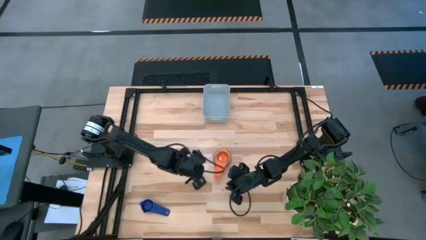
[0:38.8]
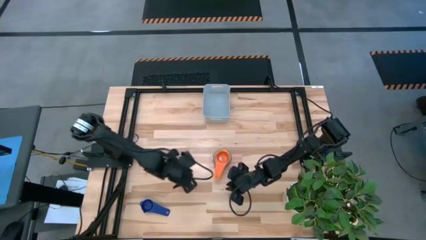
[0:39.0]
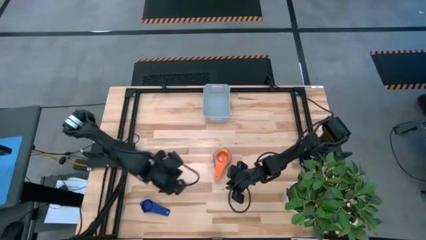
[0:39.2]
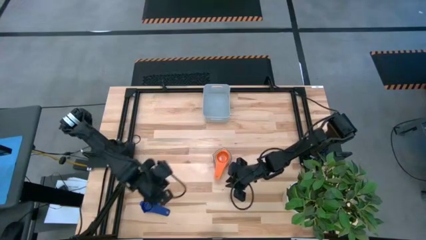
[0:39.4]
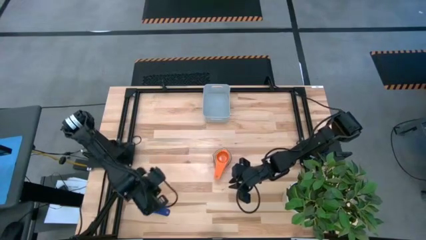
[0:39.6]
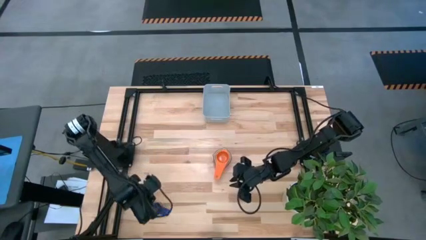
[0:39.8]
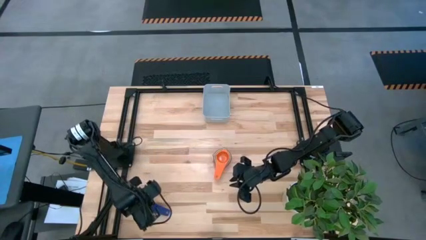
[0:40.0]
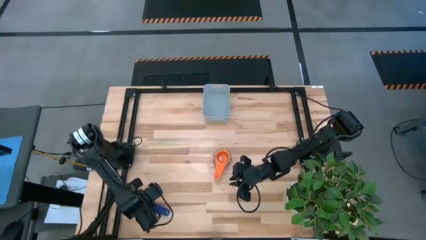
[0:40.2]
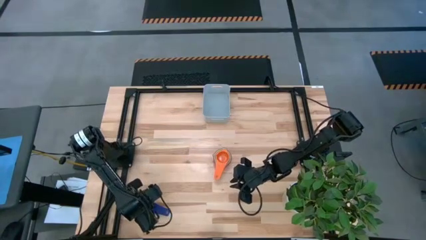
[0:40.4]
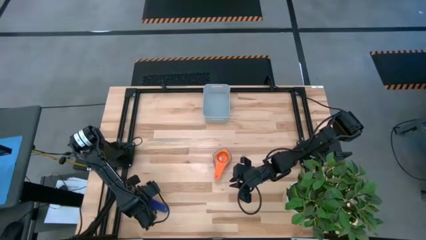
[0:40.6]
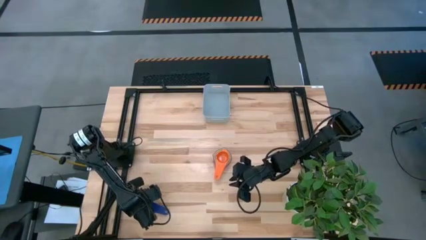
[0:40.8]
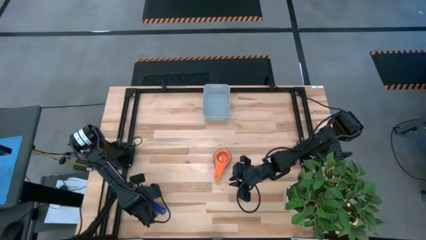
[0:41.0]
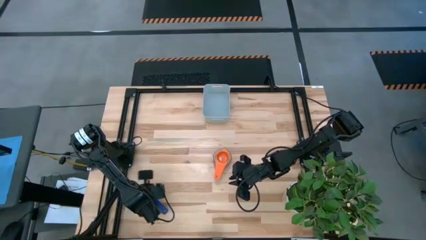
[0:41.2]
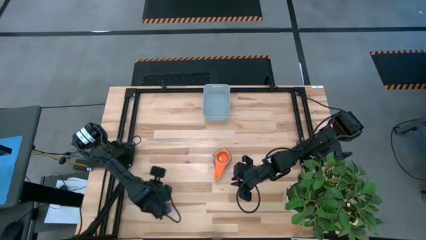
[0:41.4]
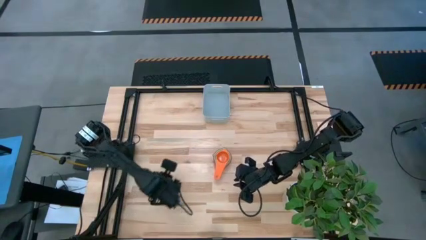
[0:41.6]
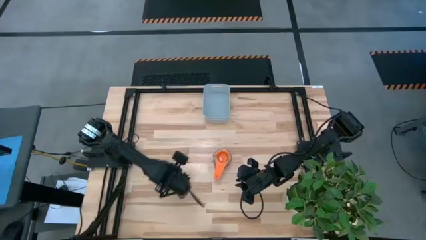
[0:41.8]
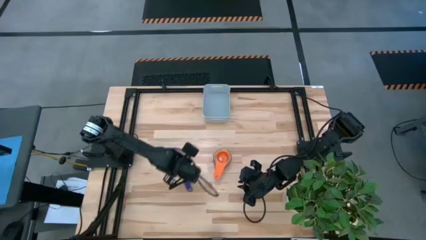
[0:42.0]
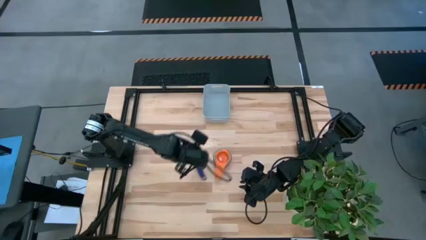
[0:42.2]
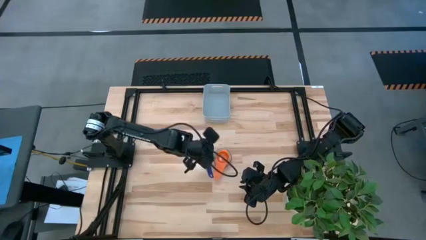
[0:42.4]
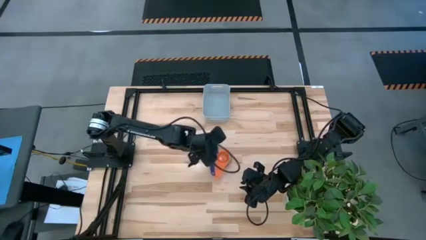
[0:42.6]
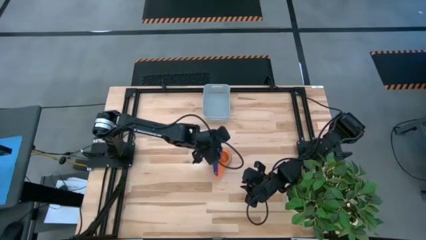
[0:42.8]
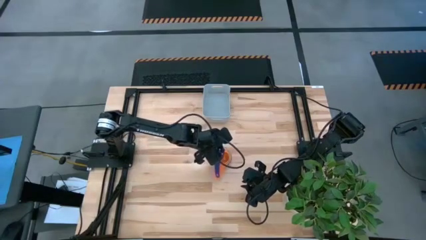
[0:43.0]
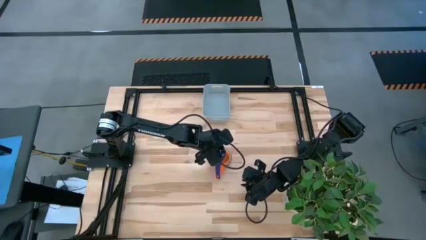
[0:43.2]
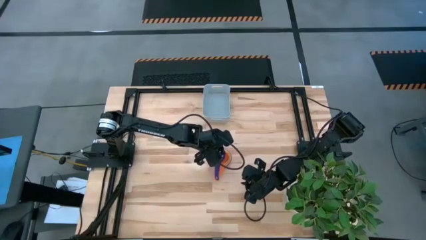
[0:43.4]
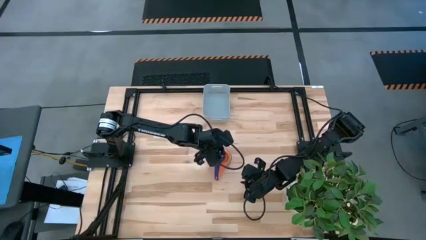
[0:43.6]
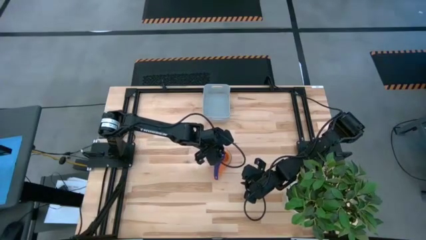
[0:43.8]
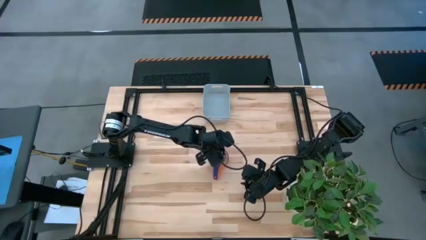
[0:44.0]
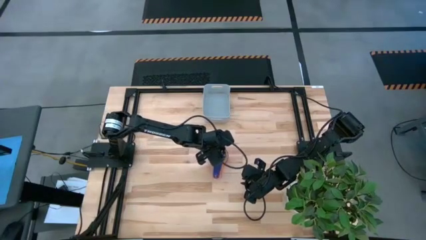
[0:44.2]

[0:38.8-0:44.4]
Task: Nest measuring cups in basket
Stack the violet measuring cup on top of the orange measuring cup

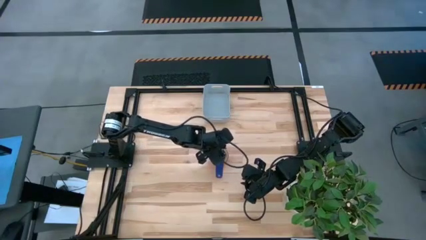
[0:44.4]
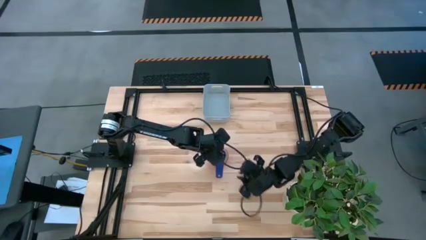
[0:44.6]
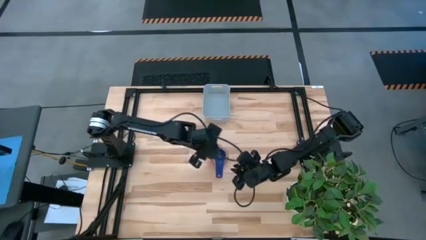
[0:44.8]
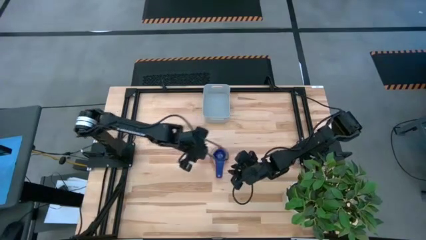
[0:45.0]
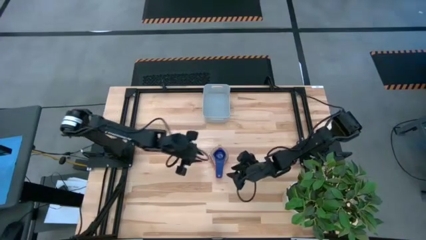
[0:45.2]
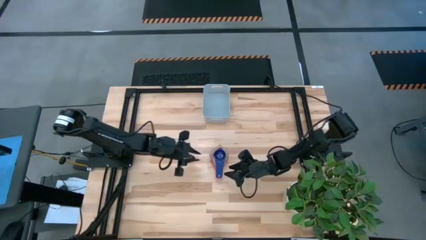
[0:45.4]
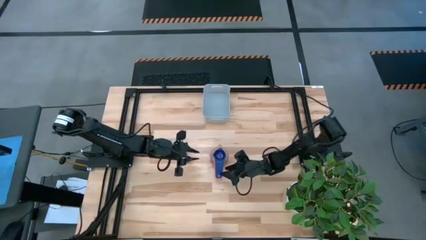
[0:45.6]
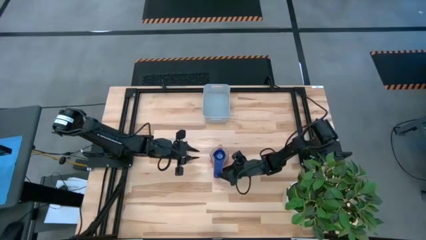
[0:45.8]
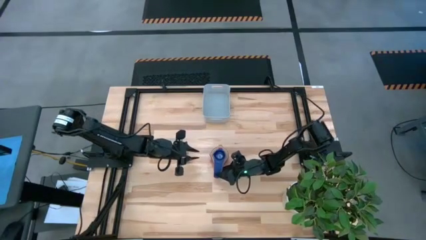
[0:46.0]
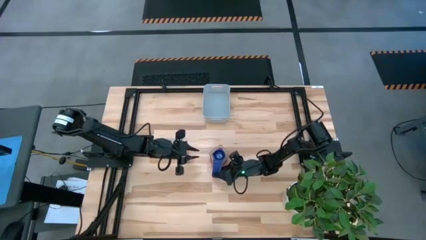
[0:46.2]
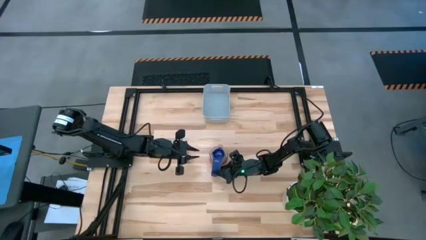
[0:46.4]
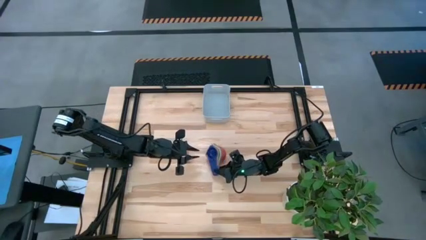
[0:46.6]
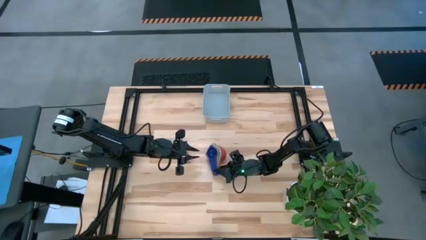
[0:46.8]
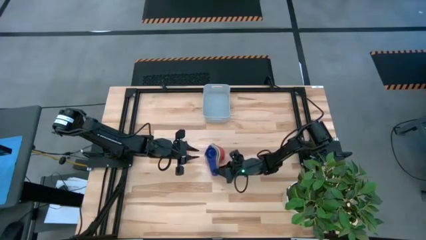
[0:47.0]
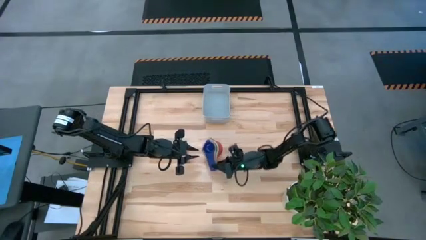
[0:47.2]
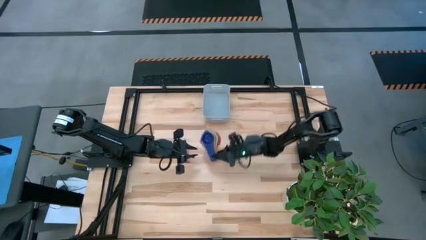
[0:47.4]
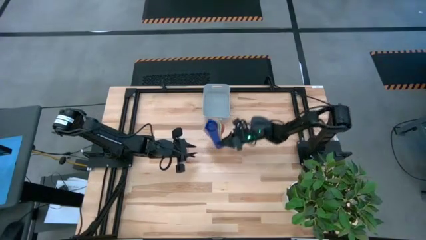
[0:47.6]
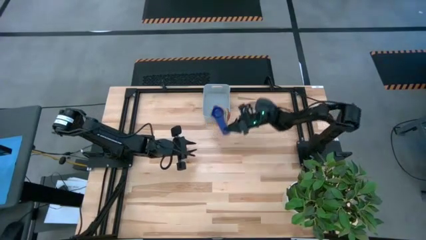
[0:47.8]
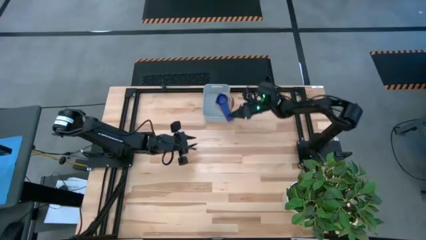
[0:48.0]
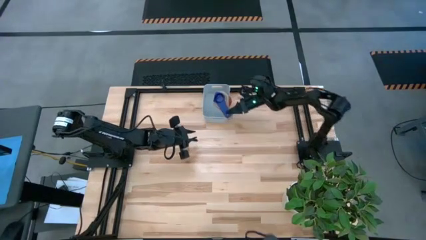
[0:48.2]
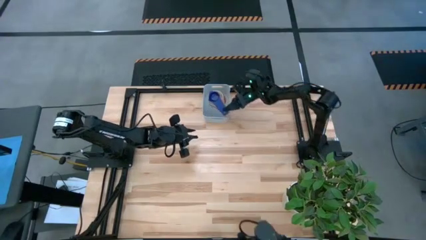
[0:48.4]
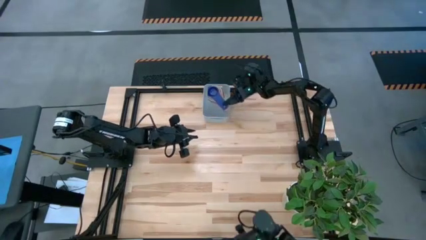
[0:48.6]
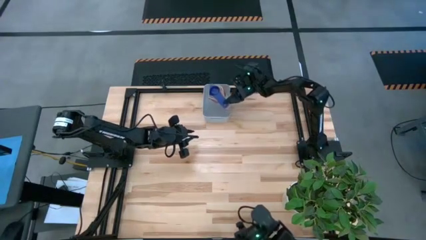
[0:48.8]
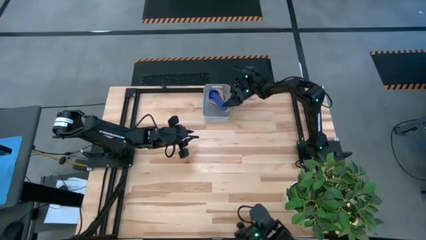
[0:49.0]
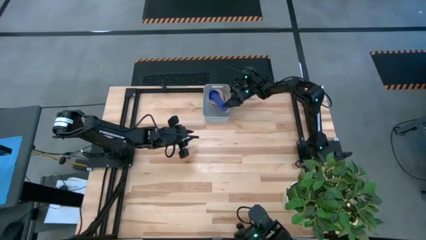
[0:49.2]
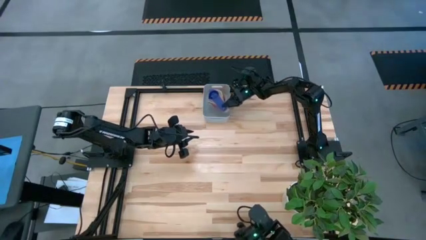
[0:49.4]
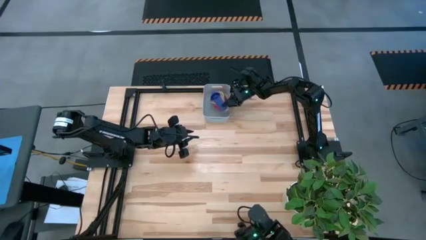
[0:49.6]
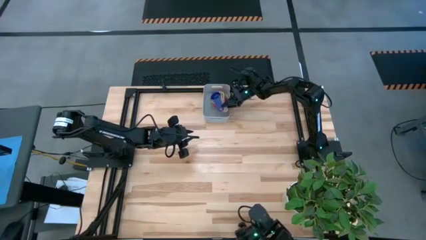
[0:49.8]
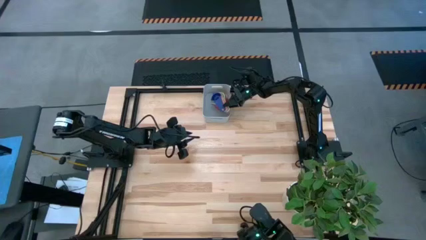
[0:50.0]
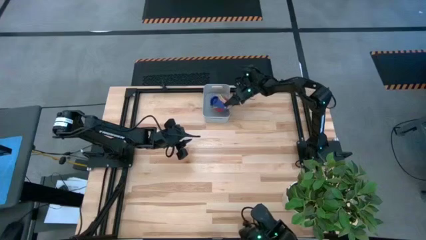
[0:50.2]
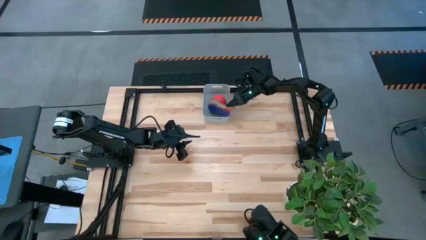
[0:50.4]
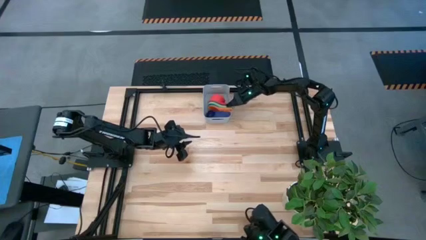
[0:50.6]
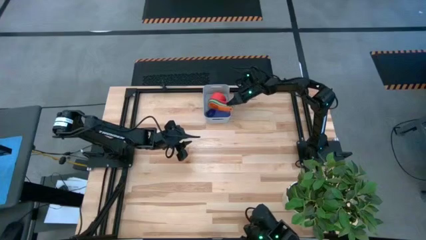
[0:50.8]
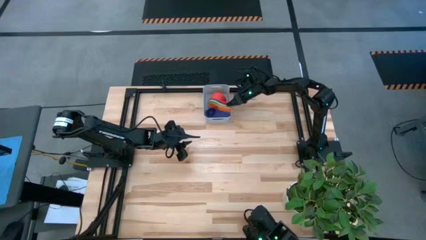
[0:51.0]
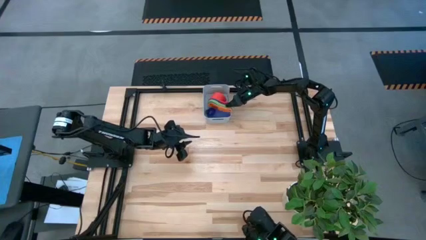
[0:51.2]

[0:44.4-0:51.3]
Put the nested measuring cups into the gray bin

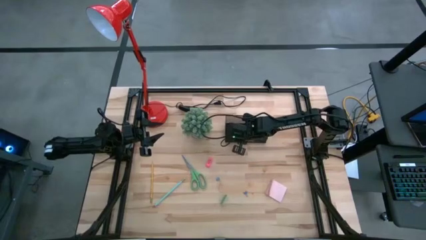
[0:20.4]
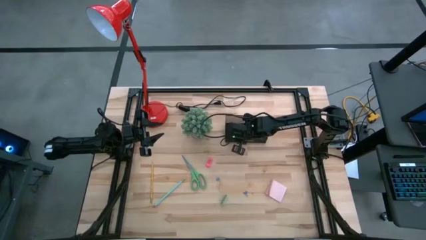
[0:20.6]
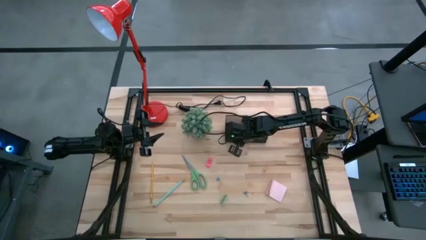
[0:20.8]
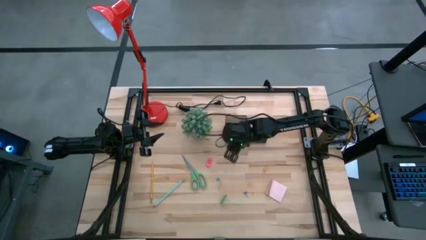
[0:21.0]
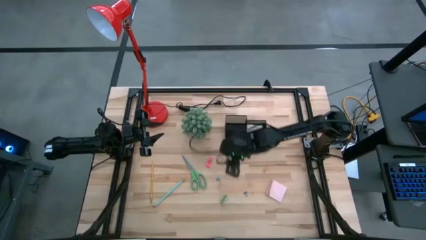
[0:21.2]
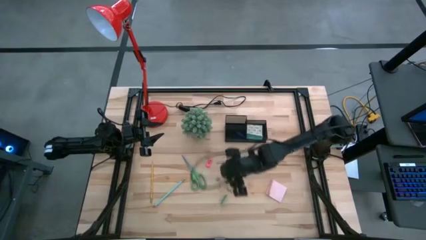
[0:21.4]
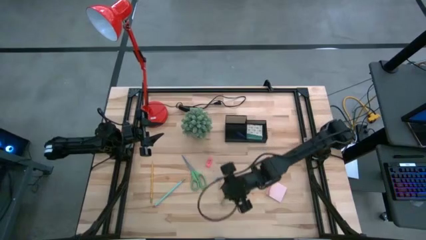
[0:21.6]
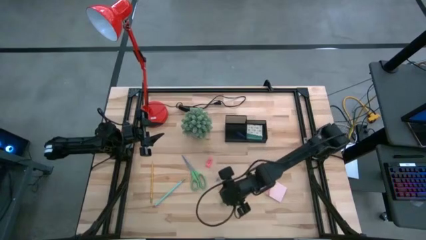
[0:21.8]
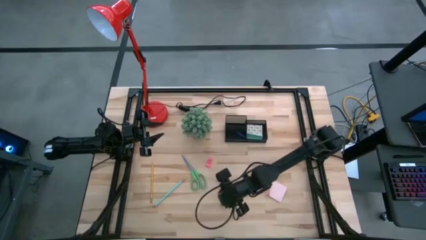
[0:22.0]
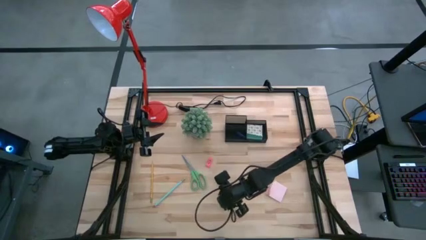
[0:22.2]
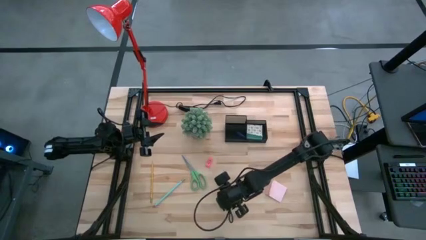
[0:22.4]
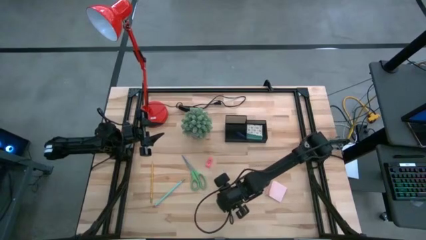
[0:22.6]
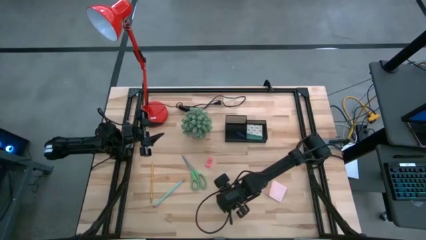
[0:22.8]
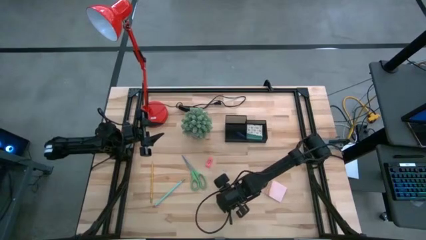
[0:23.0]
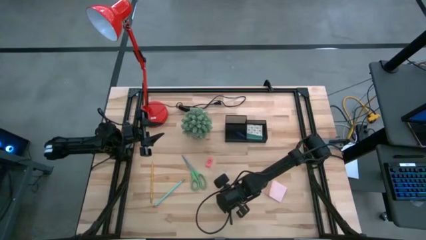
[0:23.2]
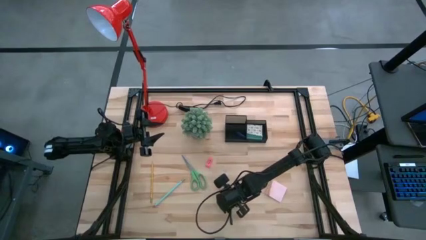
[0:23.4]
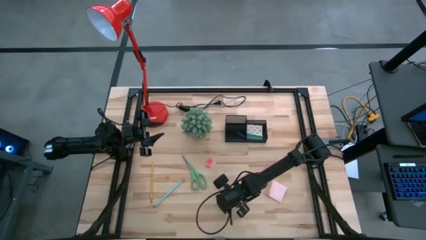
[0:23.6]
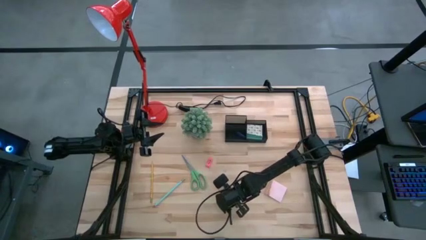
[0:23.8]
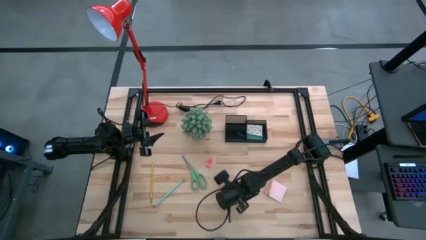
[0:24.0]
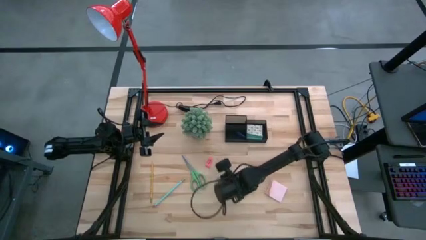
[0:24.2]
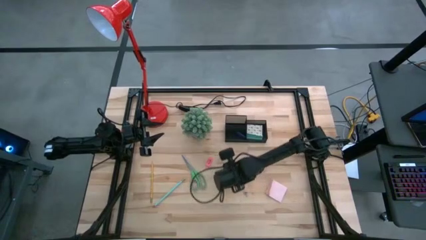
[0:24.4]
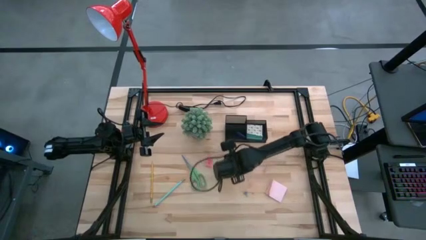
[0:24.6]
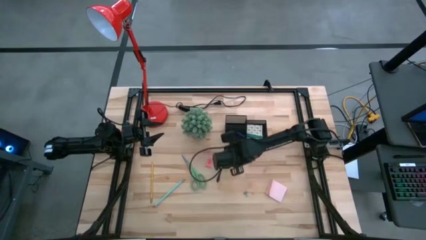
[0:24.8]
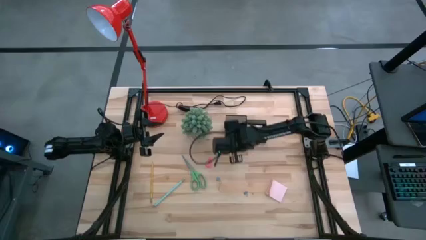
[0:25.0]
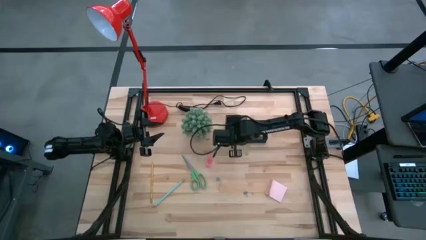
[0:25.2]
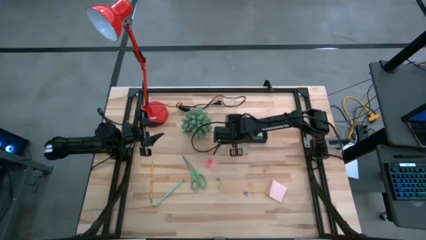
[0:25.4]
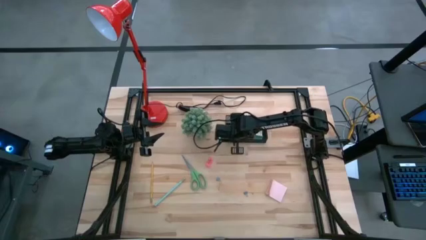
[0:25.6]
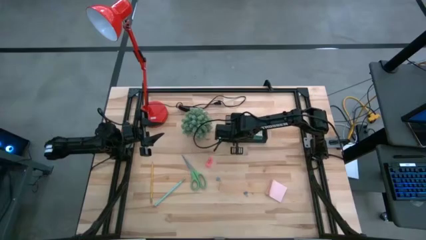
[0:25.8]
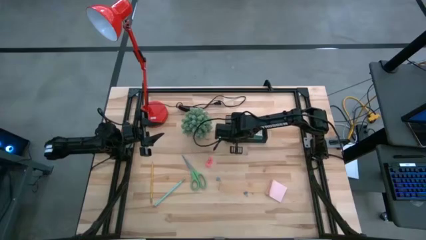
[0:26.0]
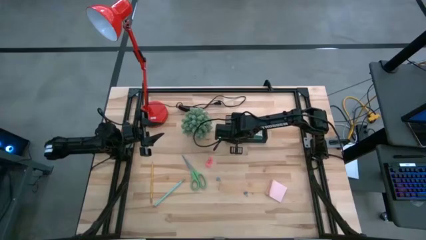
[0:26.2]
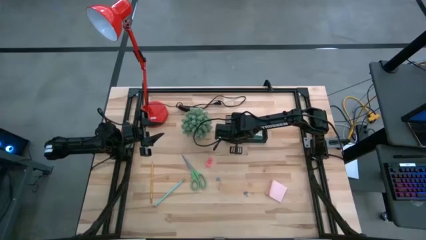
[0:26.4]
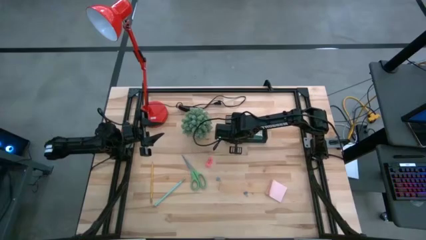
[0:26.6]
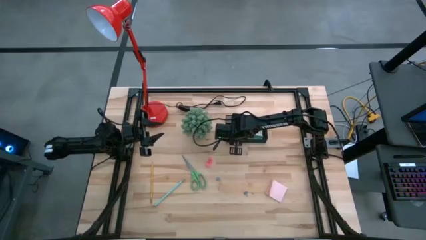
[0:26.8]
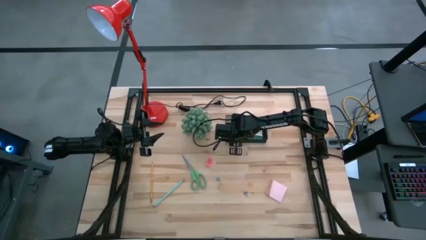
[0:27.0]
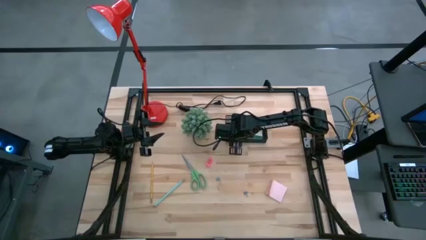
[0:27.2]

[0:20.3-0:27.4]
Task: Pick and place office supplies into organizer
Put the green eraser into the black desk organizer
